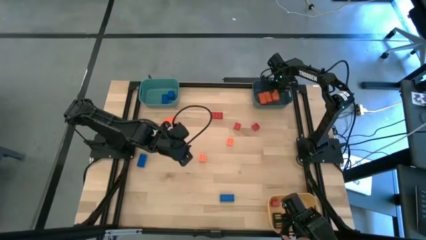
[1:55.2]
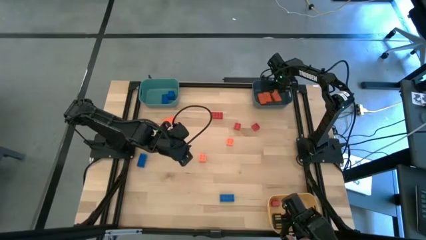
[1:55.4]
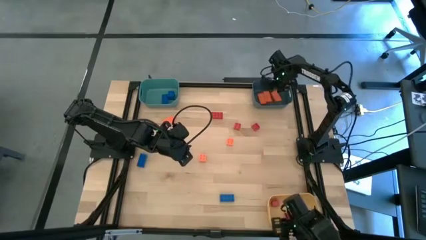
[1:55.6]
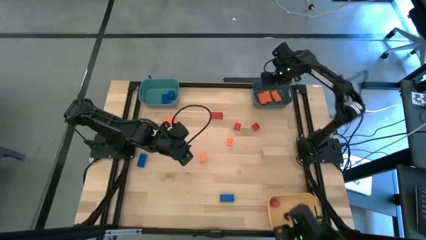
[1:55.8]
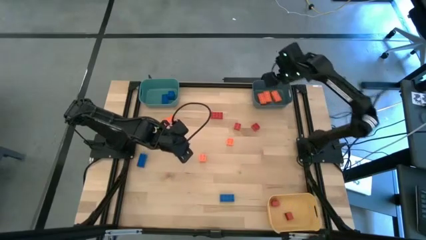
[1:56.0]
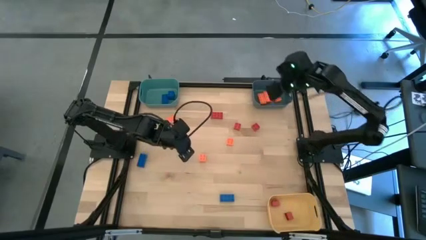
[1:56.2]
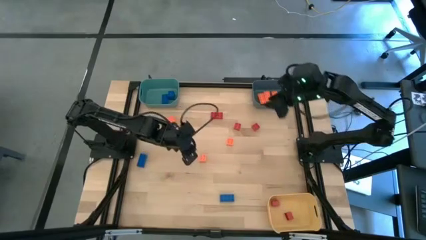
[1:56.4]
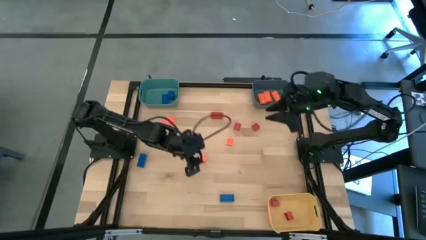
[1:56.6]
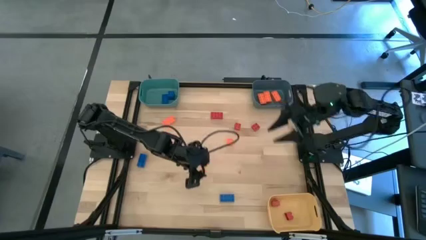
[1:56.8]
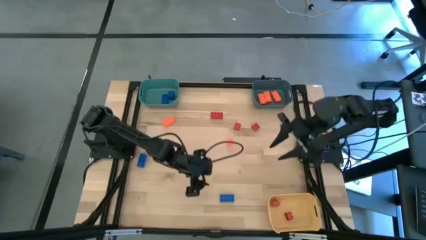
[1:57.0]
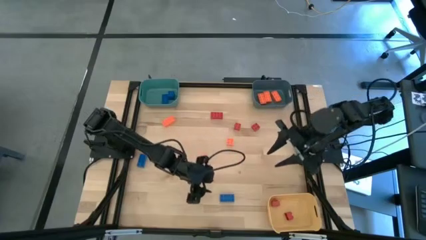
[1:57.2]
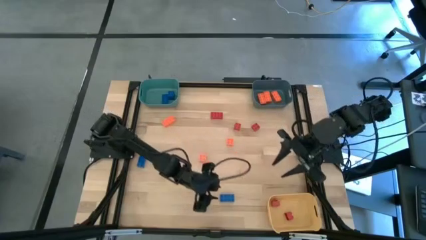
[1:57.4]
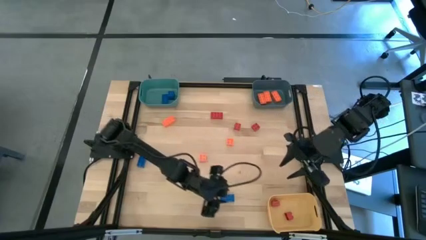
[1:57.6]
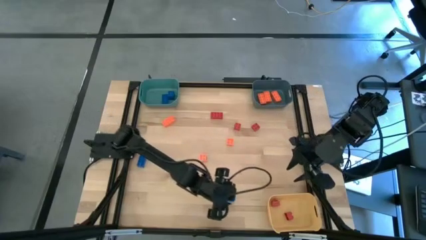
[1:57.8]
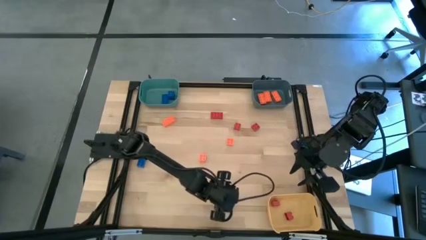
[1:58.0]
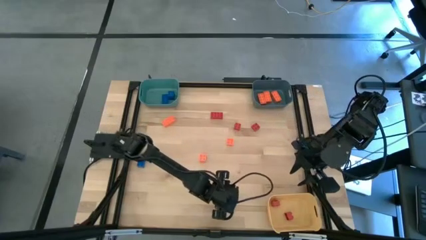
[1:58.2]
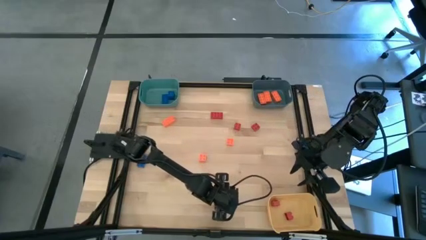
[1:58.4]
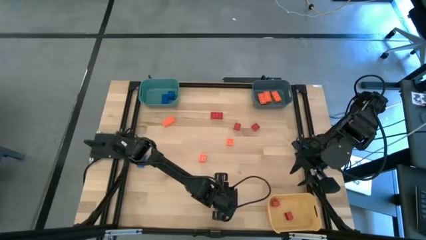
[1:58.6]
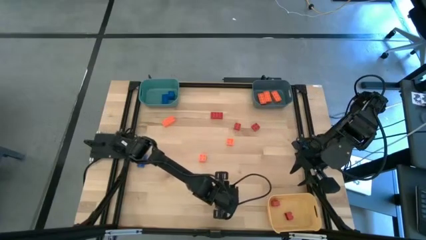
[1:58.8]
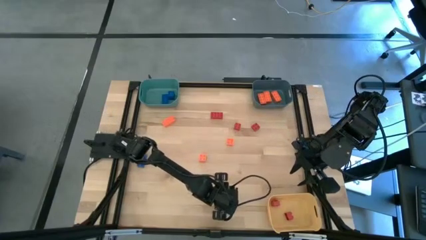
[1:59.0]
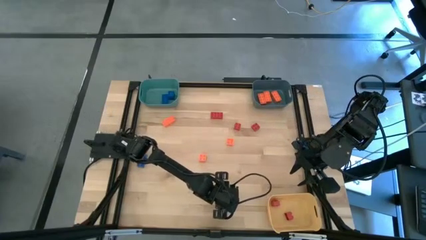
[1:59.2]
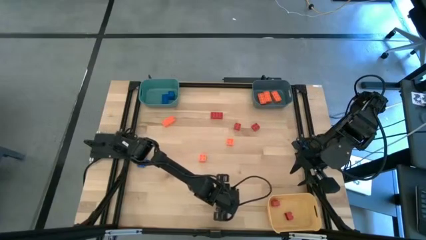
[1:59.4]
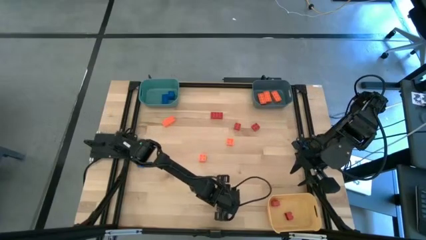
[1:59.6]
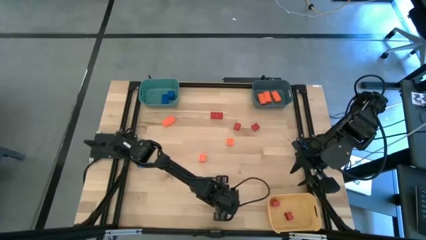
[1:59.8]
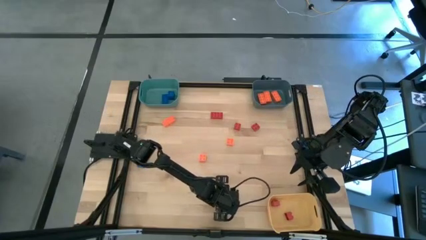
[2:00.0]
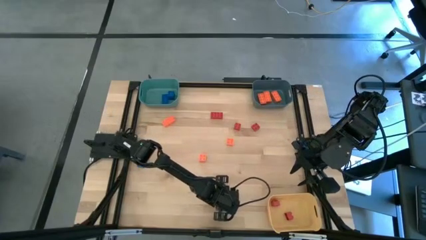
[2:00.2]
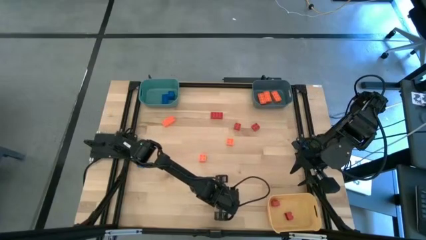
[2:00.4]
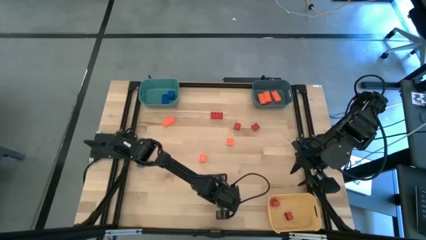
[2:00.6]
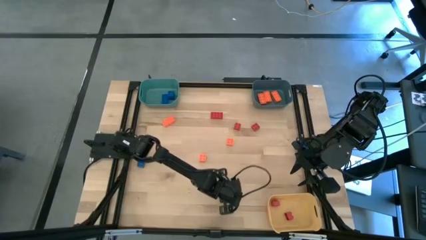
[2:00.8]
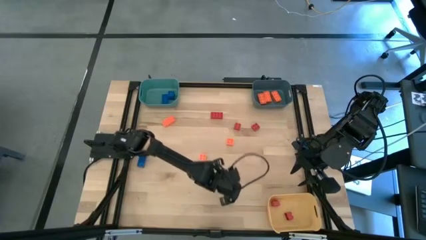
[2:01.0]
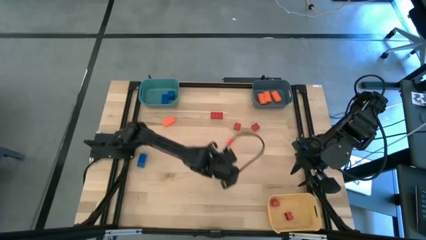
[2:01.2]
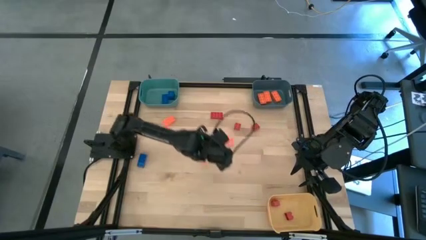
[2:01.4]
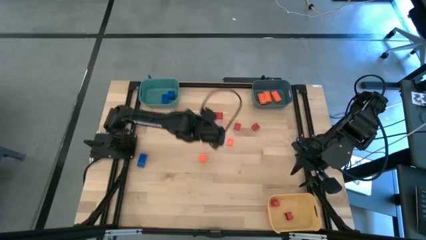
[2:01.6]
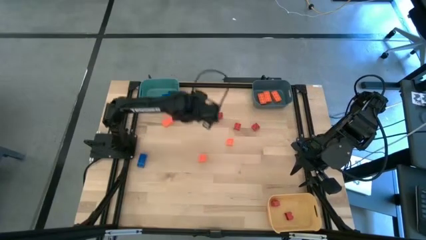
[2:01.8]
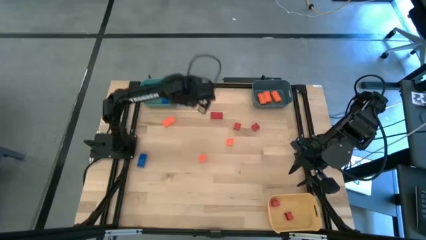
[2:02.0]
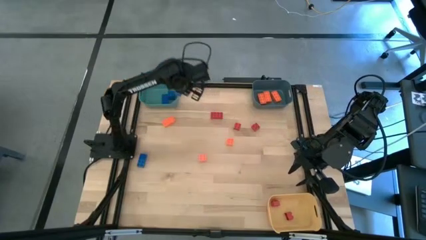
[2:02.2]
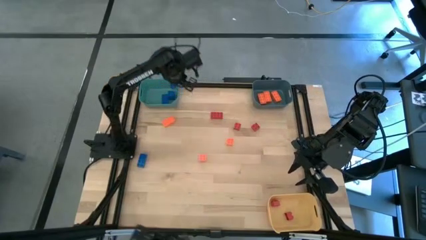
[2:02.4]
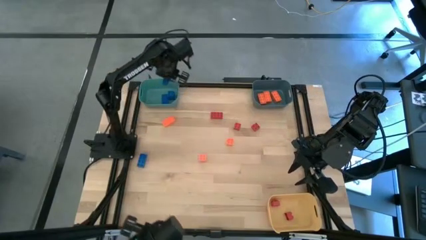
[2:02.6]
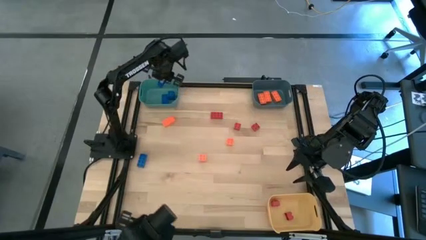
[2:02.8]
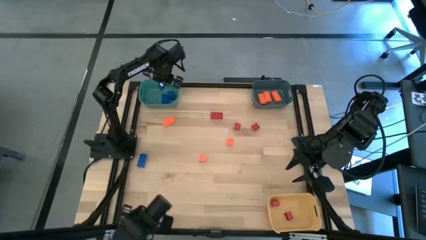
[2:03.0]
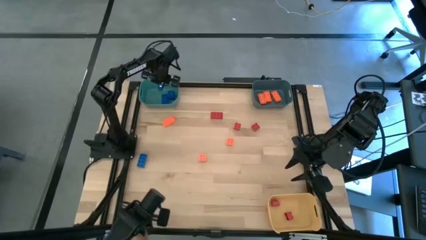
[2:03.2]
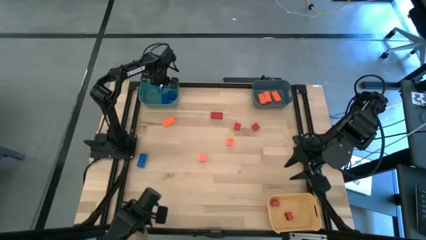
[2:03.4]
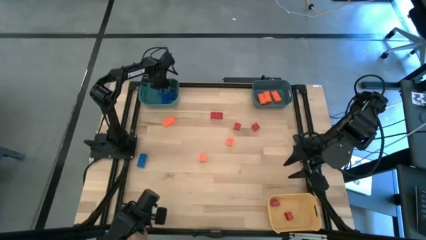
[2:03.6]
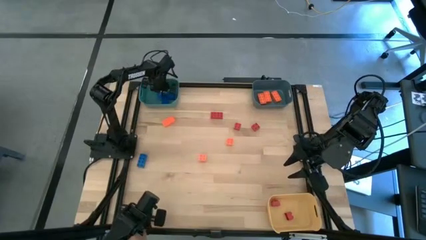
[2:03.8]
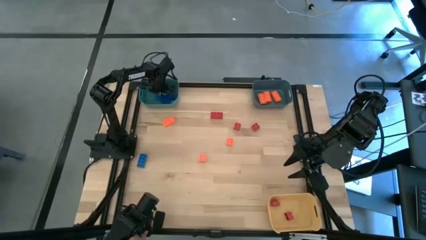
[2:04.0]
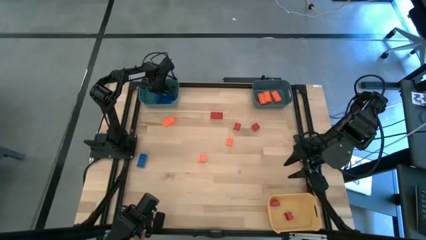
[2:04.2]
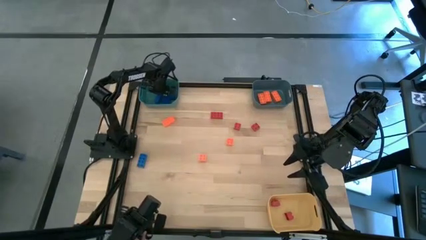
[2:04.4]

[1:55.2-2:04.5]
Task: Sort & place blocks by color
Put the blue game piece into the green bin
